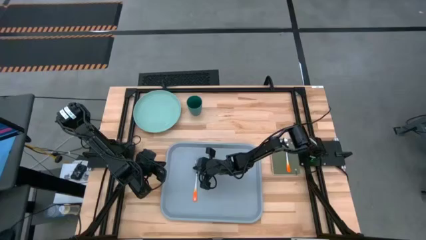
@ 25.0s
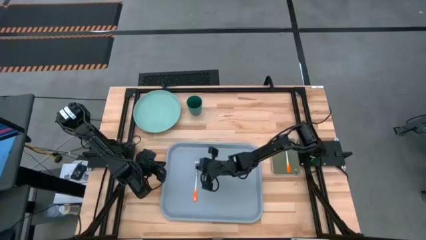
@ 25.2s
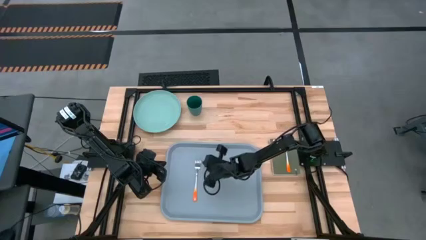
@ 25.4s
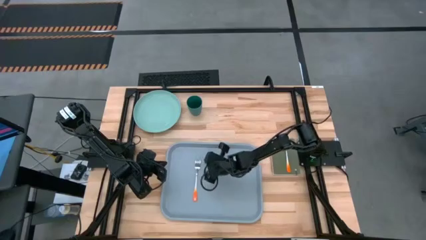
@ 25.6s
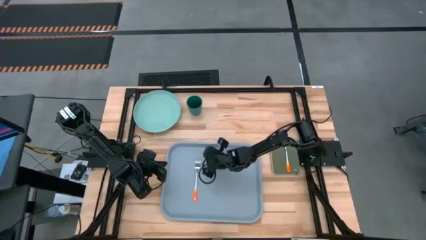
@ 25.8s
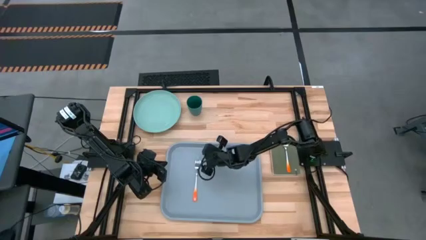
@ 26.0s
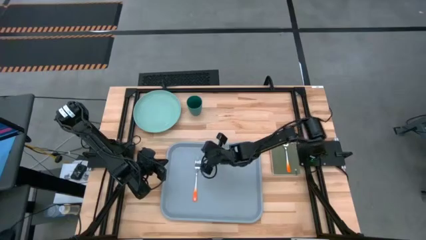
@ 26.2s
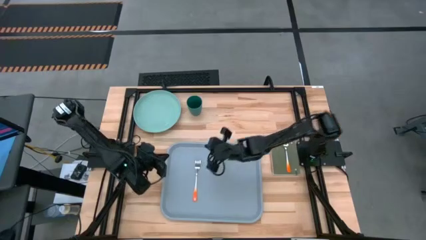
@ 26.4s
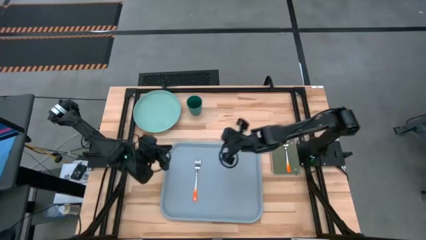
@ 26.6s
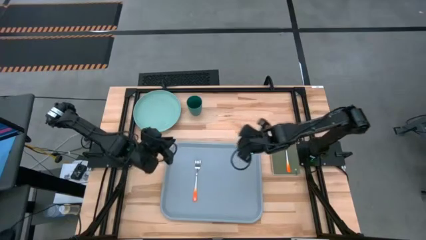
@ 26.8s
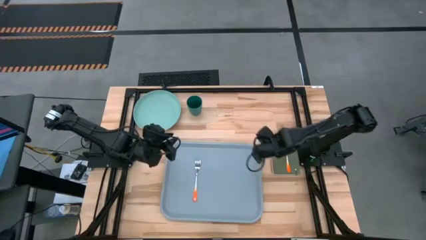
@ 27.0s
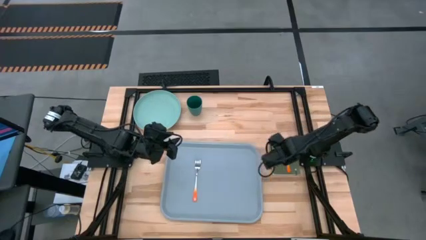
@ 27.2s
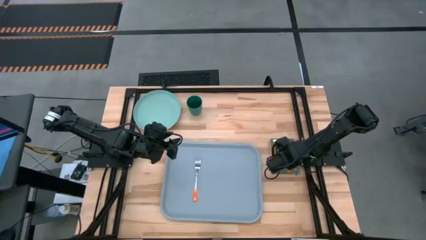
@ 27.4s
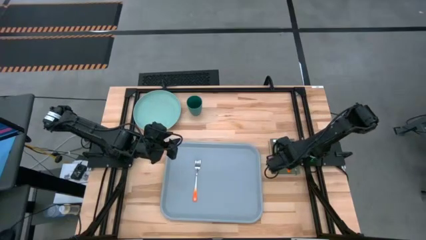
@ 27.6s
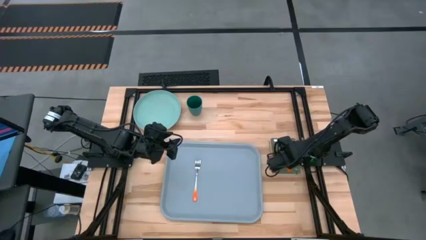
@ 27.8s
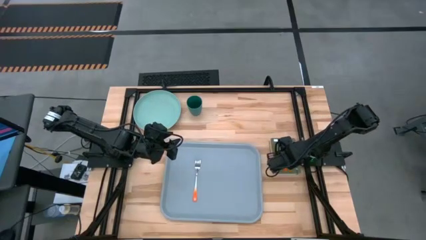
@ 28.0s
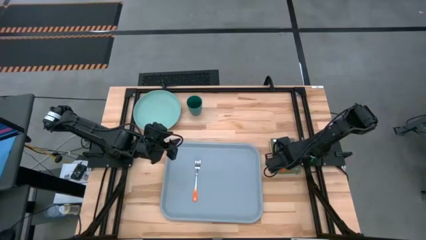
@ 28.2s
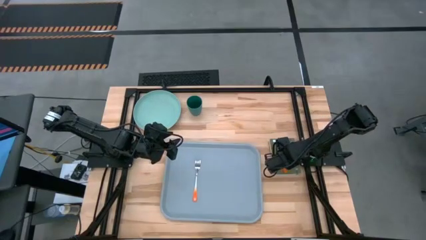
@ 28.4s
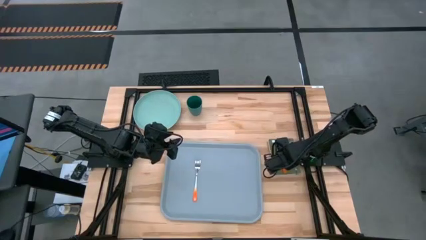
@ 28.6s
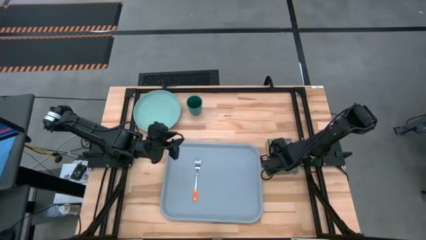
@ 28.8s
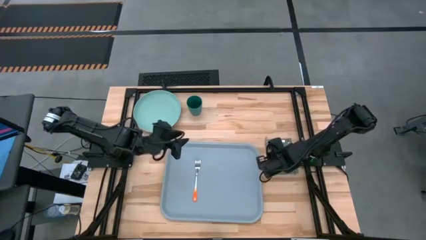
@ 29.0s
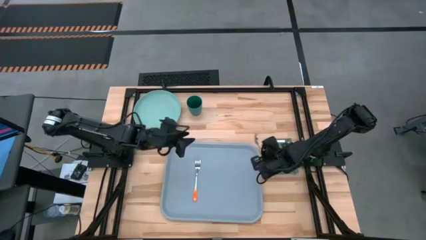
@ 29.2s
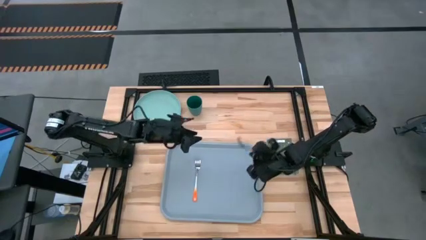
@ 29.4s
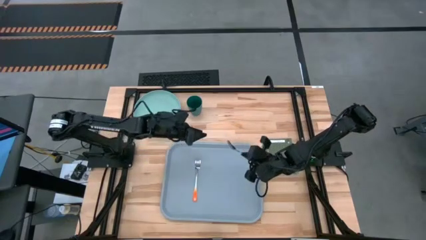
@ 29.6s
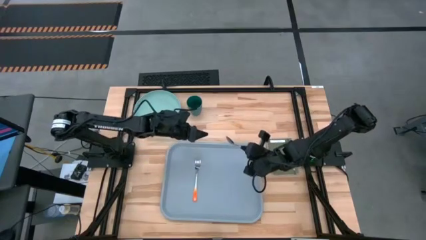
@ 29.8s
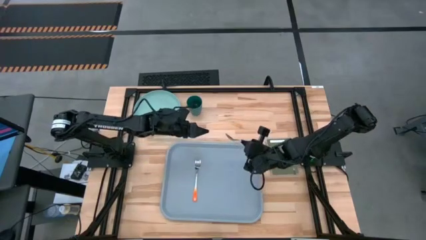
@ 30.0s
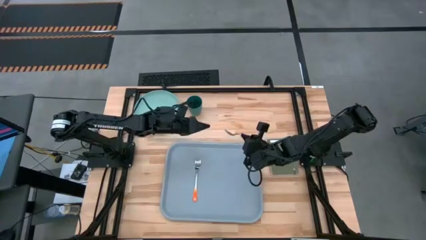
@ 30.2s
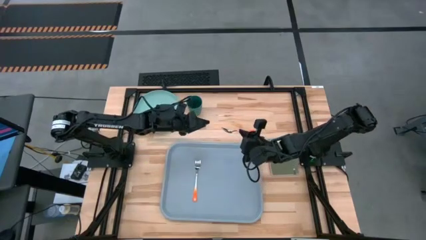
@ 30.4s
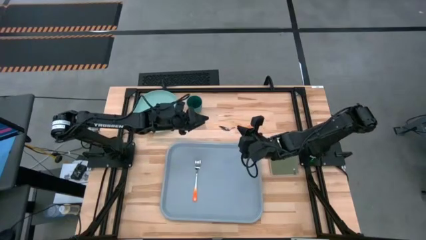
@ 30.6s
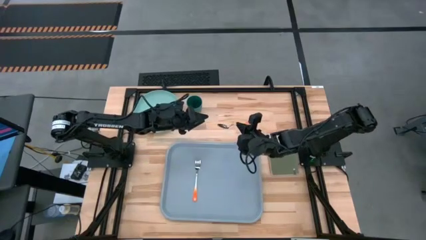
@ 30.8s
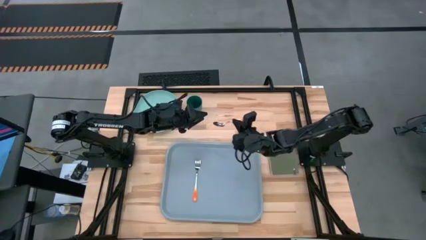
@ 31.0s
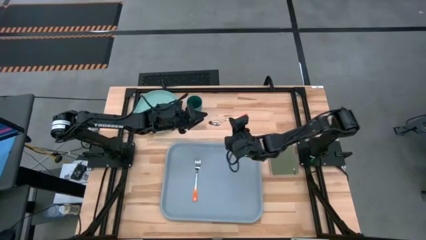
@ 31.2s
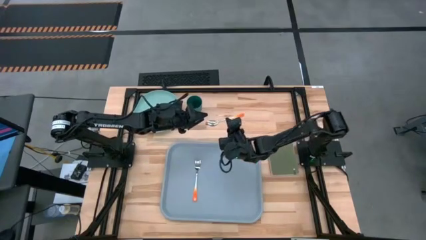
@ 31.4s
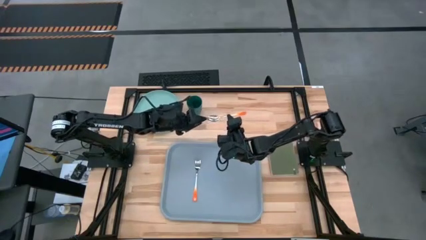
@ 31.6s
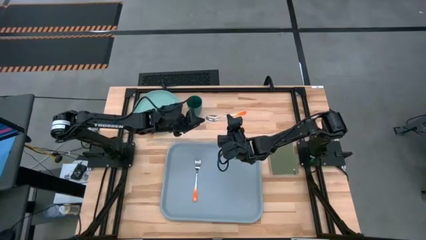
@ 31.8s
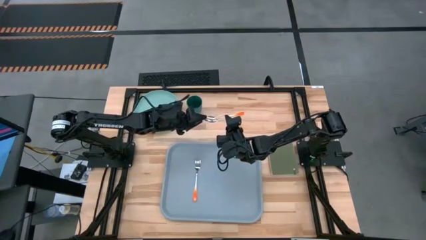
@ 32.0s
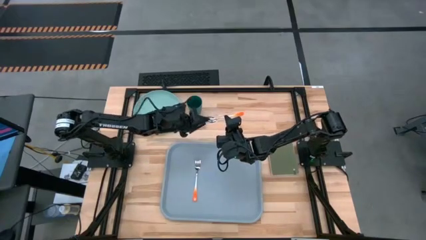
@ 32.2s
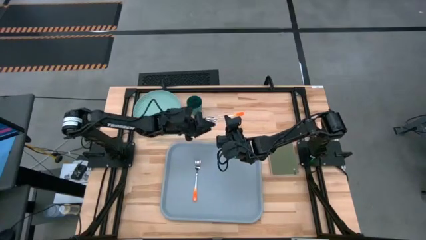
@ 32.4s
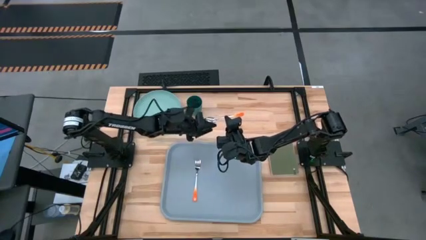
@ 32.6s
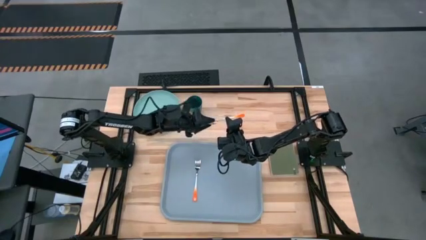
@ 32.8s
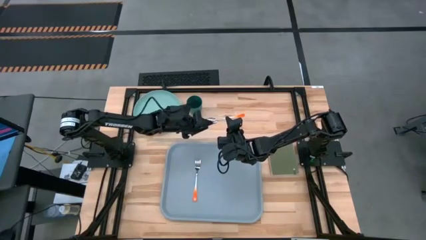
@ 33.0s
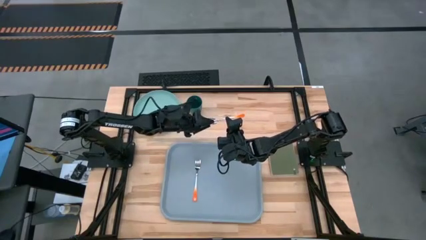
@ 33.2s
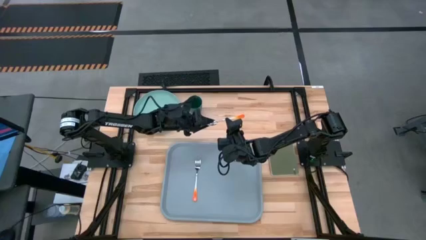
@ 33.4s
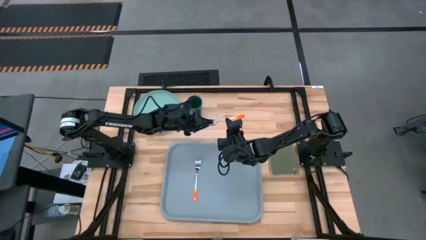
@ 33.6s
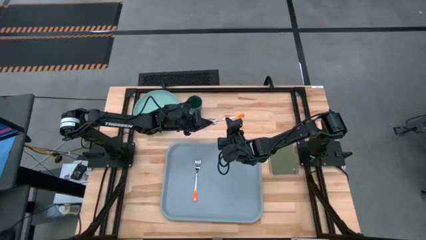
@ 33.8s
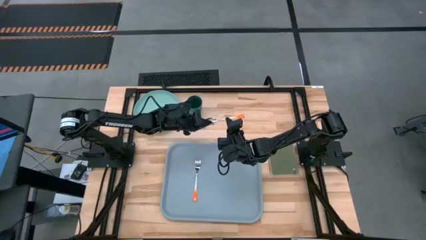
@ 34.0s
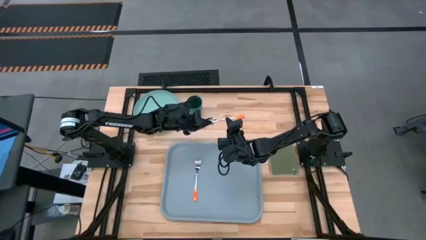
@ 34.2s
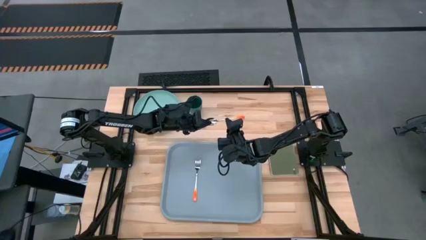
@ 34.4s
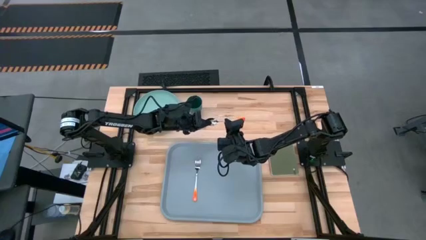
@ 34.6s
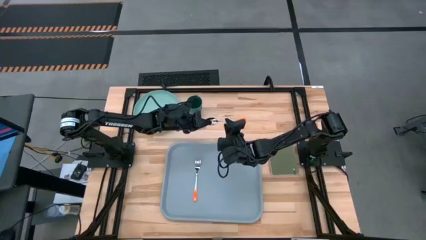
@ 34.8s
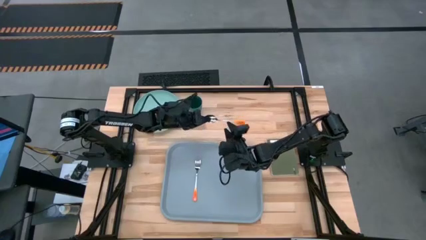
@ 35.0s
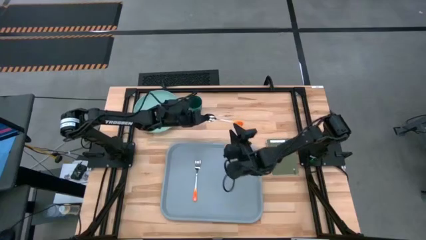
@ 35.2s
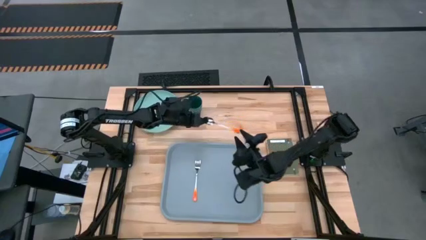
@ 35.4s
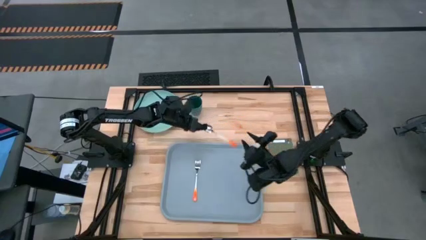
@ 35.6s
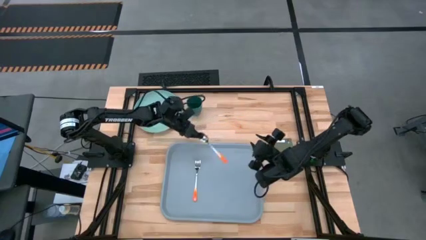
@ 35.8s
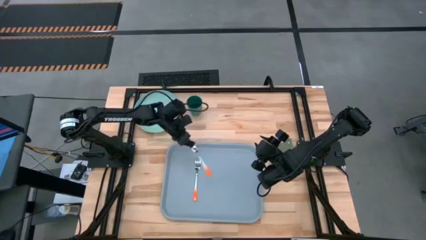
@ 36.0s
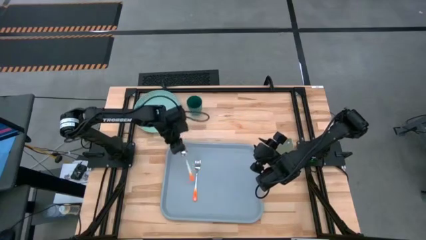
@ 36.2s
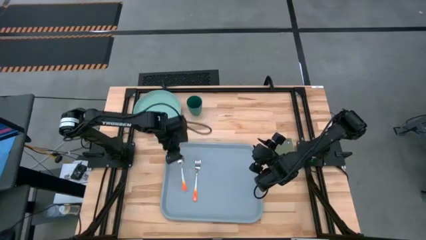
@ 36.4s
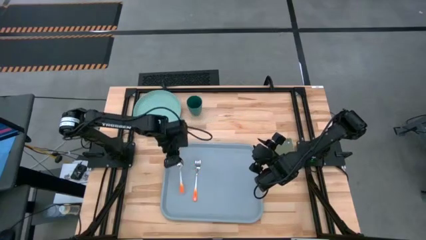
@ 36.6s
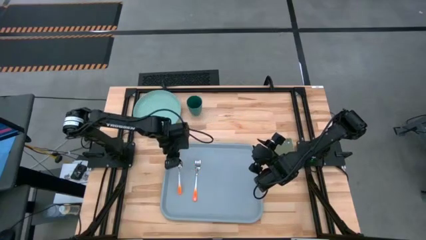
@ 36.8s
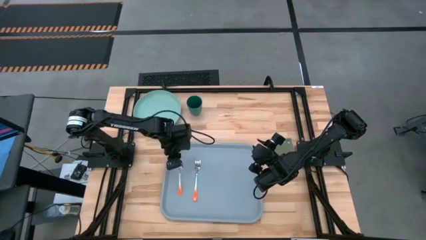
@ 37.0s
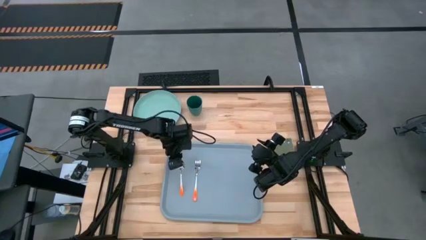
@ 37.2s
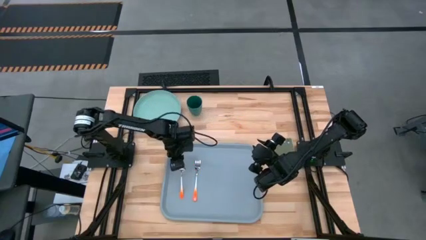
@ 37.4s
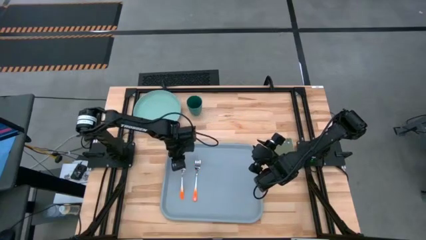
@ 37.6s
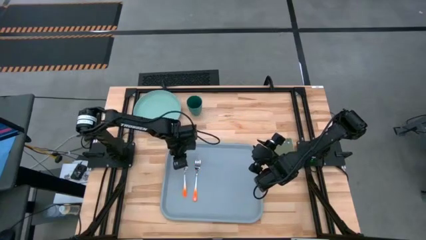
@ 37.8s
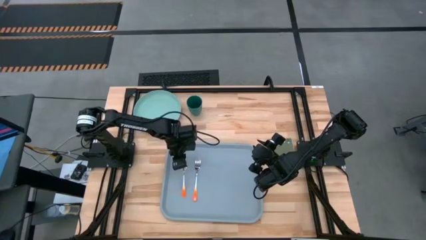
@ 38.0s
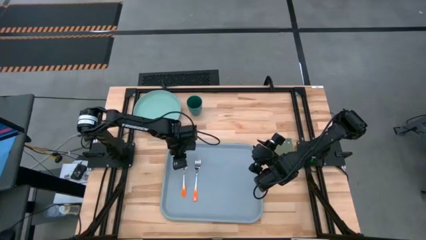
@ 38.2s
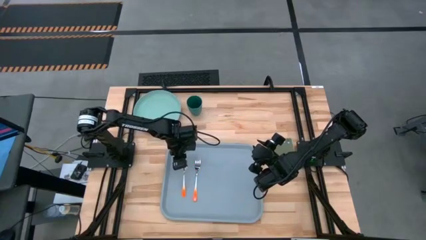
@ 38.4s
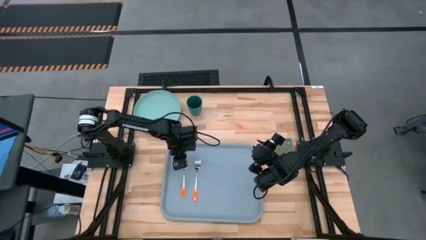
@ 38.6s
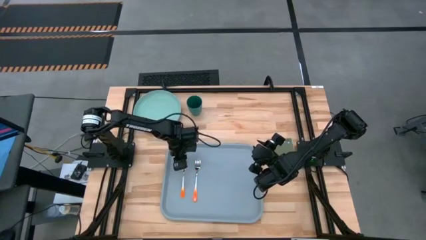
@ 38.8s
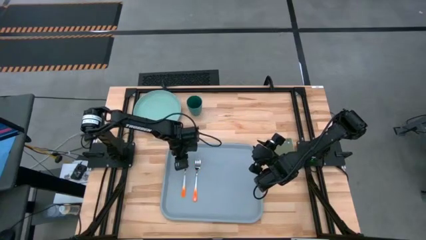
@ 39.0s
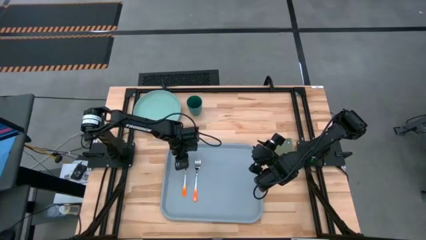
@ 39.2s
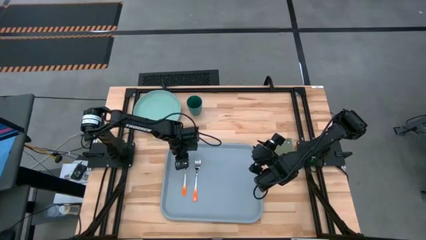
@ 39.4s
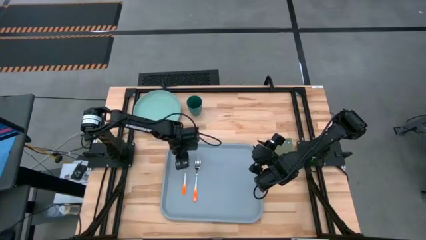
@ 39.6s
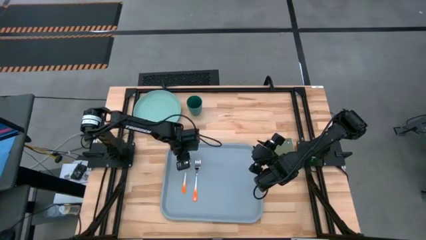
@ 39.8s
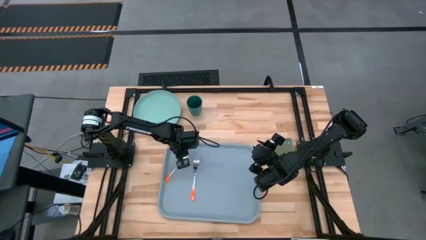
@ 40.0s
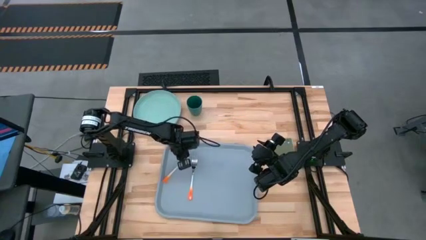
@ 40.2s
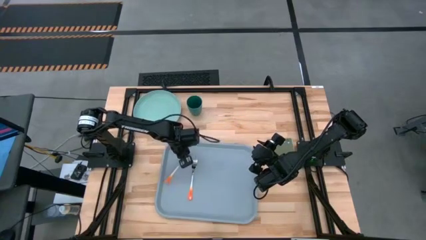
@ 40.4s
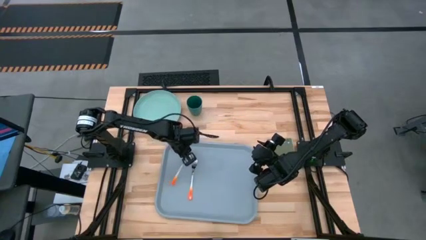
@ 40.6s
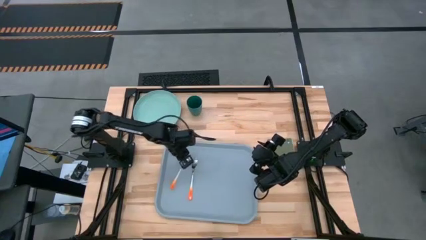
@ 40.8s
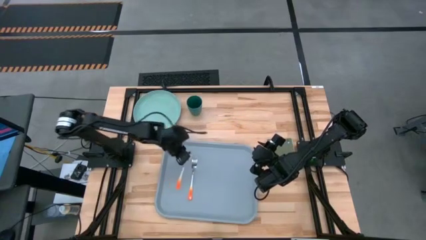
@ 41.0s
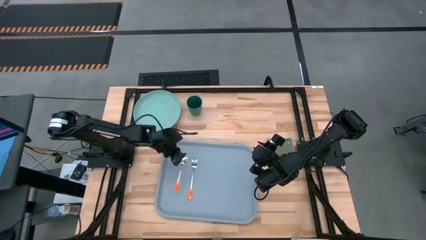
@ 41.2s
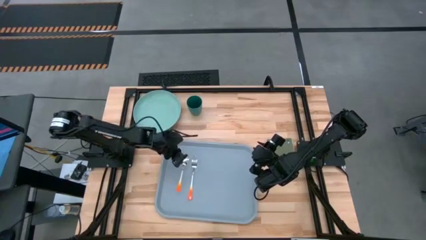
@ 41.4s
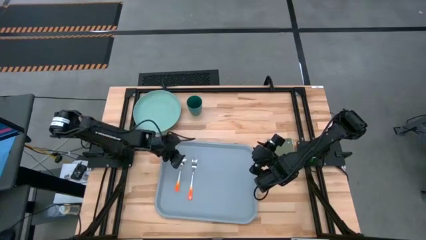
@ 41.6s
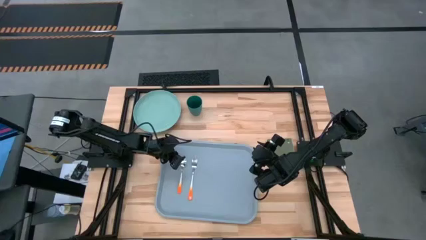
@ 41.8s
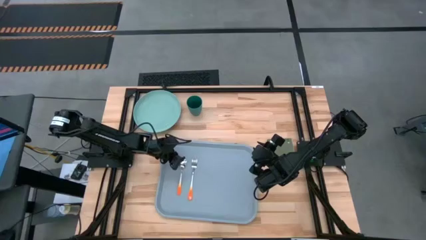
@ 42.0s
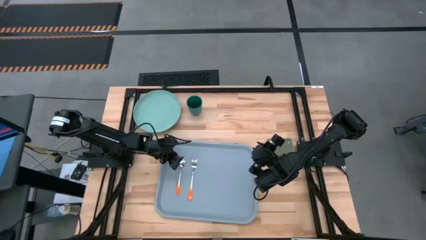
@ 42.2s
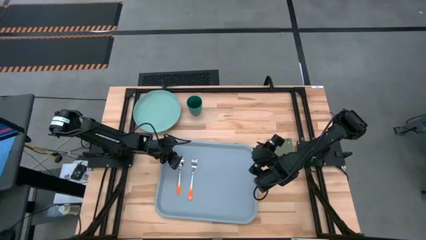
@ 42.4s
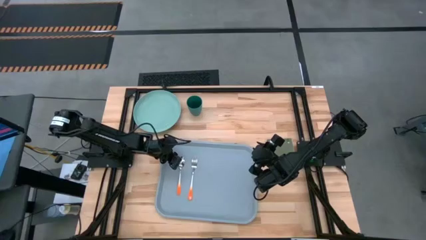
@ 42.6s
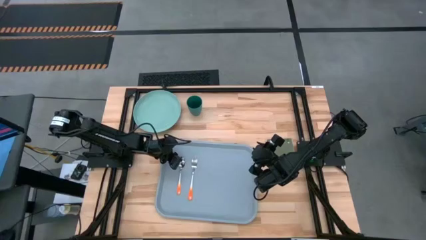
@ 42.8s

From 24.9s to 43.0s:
Task: Pick and place plate/cup/fork/spoon on tray
Put the orange spoon to the left of orange fork on the blue serving tray
